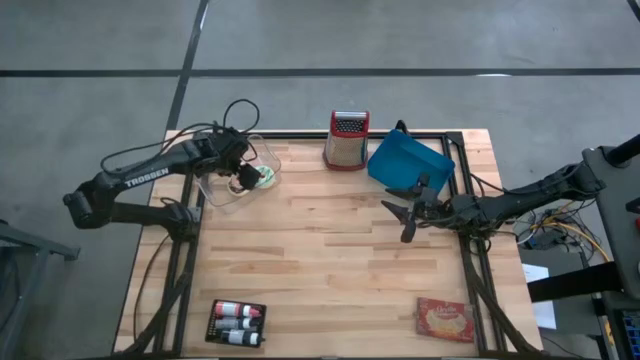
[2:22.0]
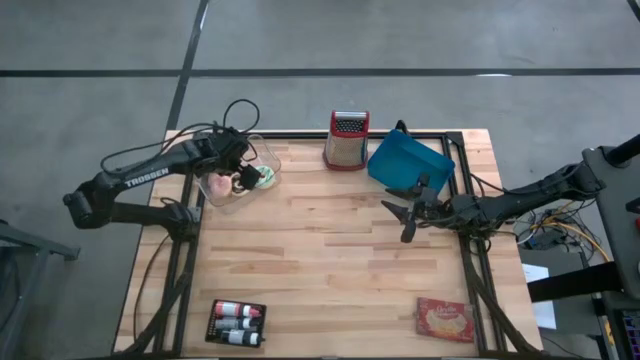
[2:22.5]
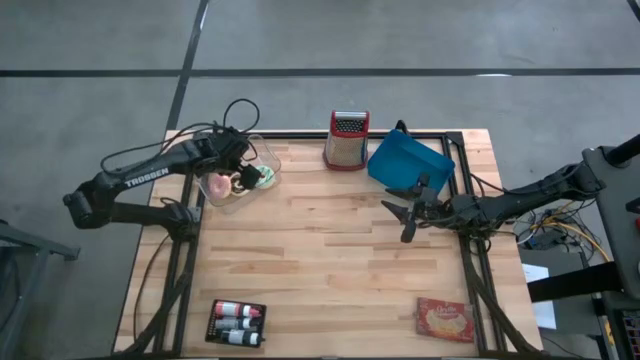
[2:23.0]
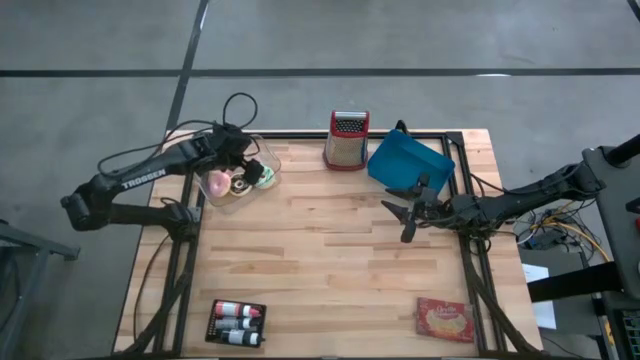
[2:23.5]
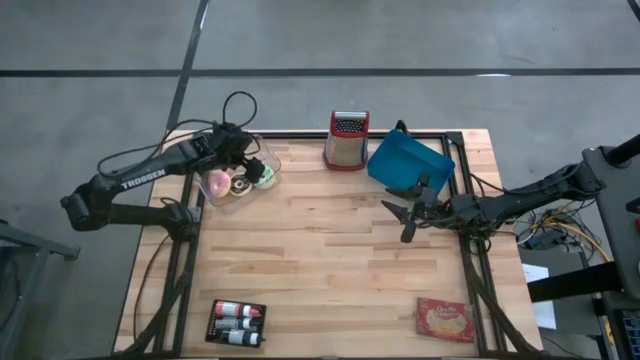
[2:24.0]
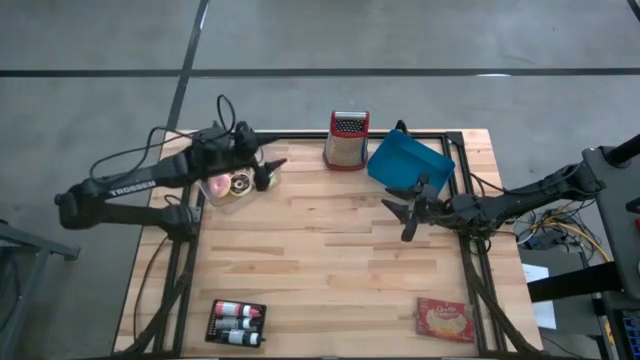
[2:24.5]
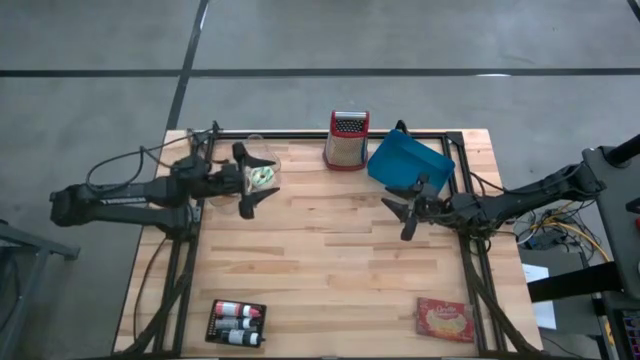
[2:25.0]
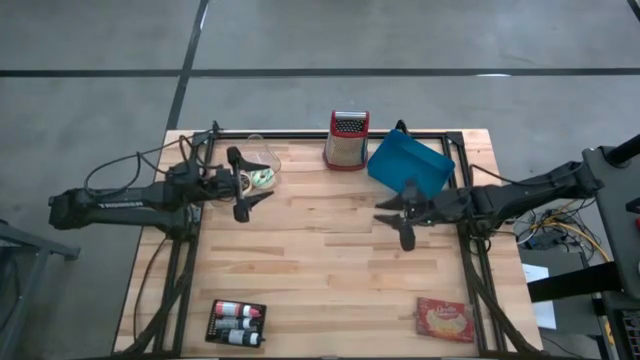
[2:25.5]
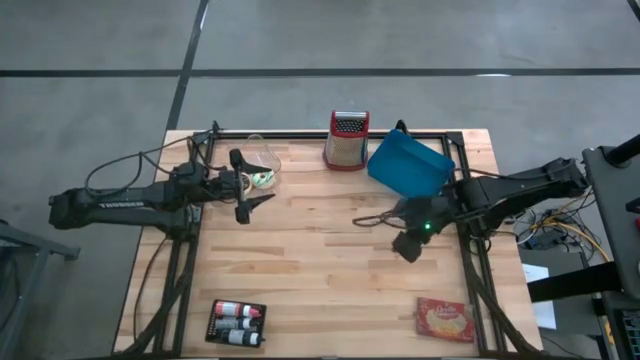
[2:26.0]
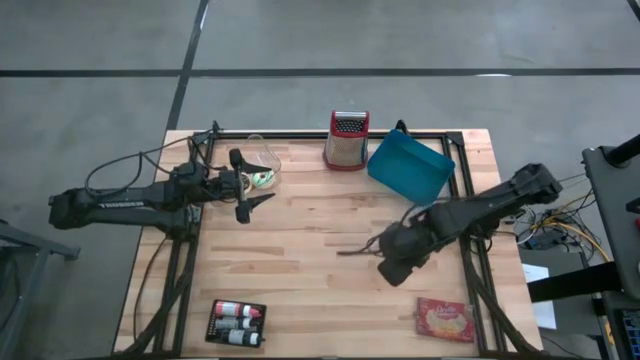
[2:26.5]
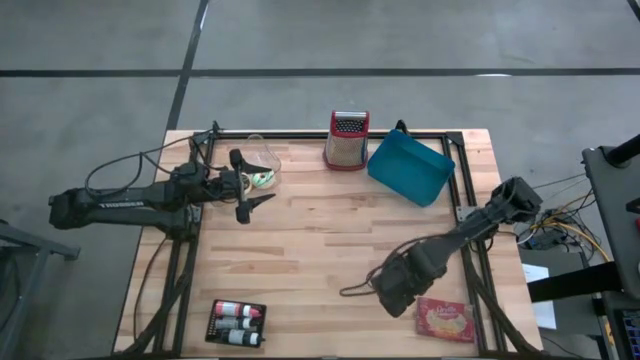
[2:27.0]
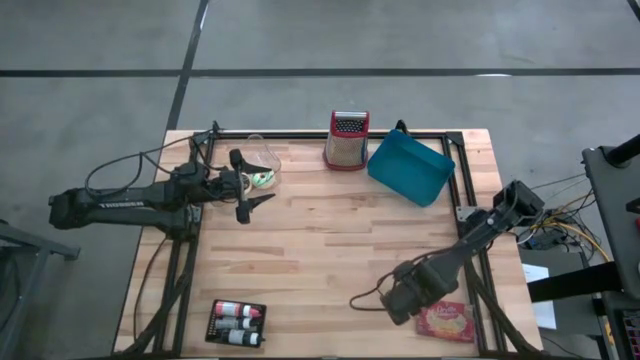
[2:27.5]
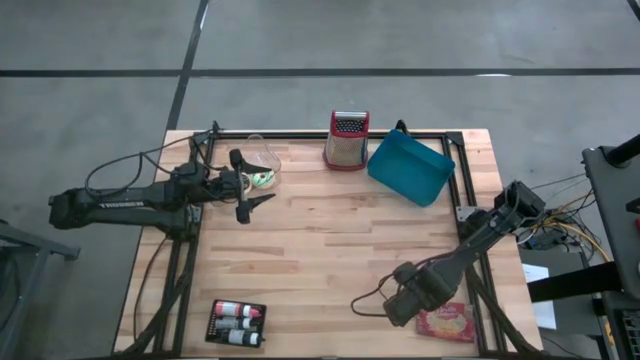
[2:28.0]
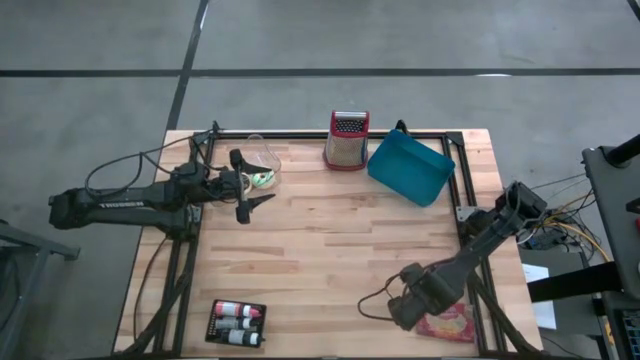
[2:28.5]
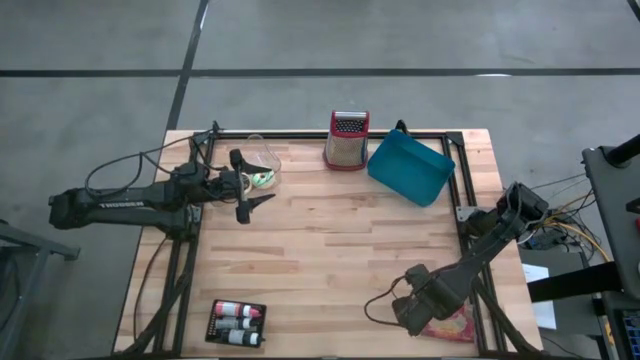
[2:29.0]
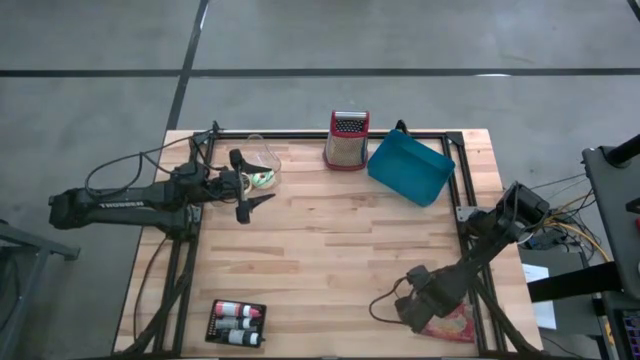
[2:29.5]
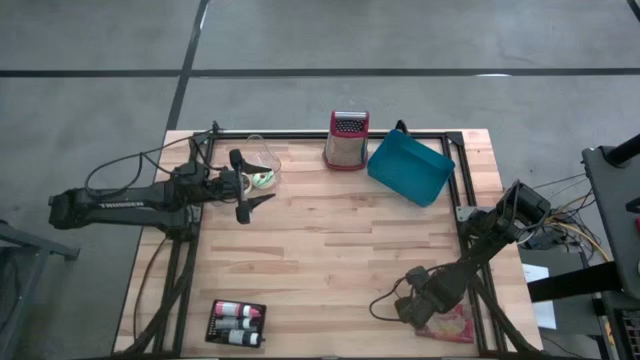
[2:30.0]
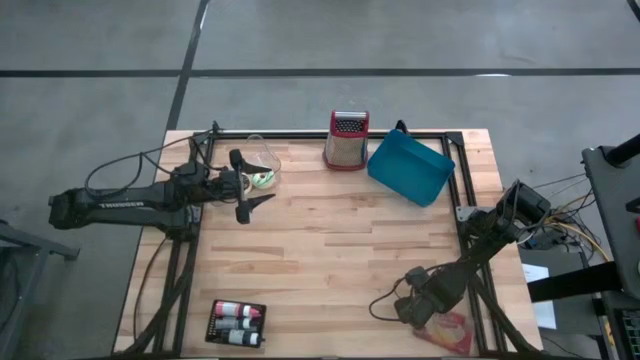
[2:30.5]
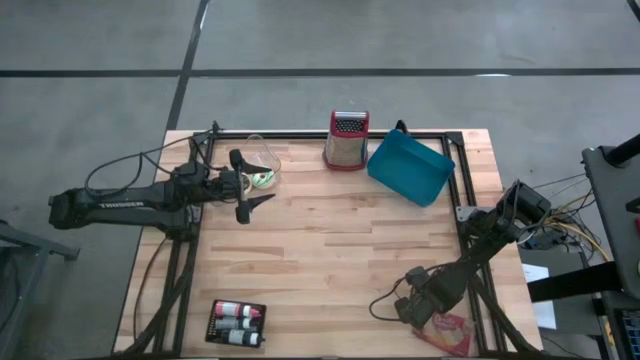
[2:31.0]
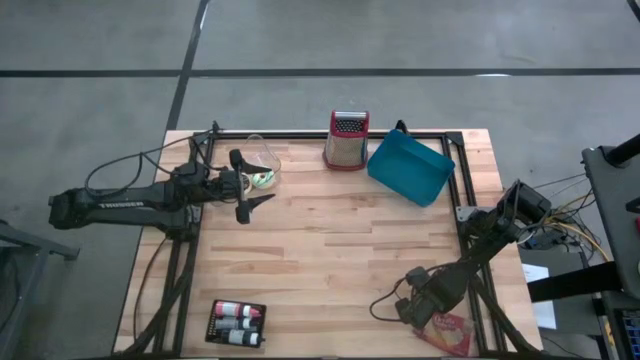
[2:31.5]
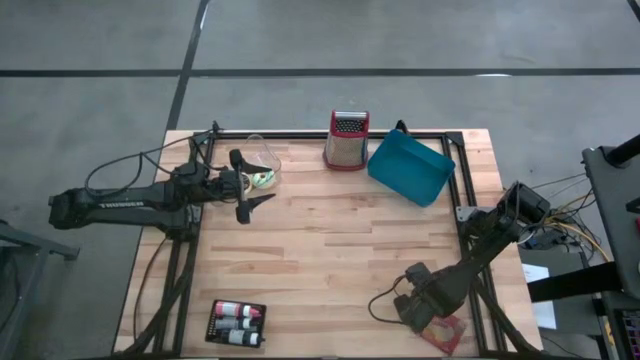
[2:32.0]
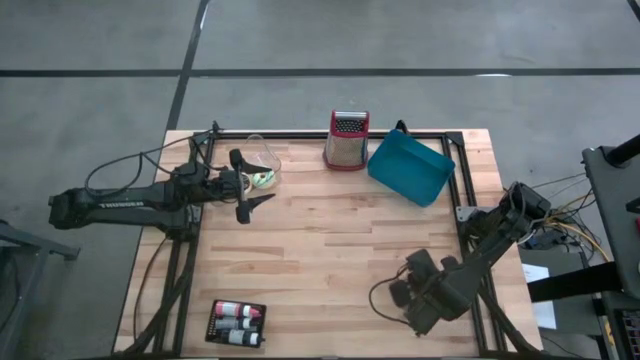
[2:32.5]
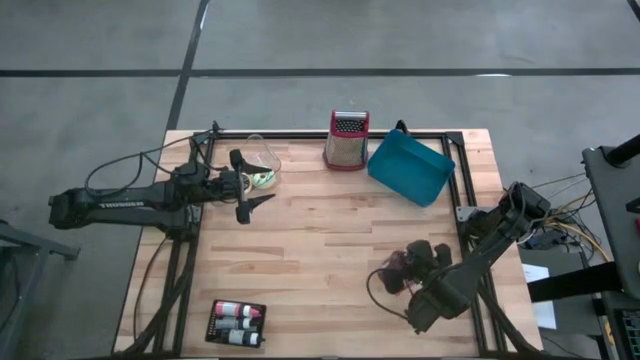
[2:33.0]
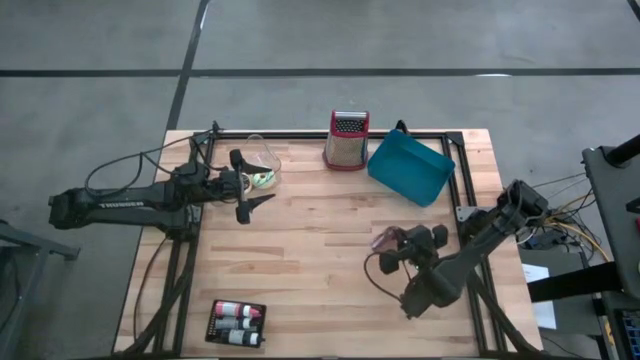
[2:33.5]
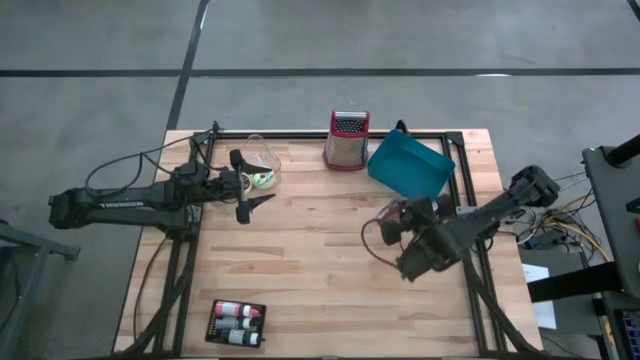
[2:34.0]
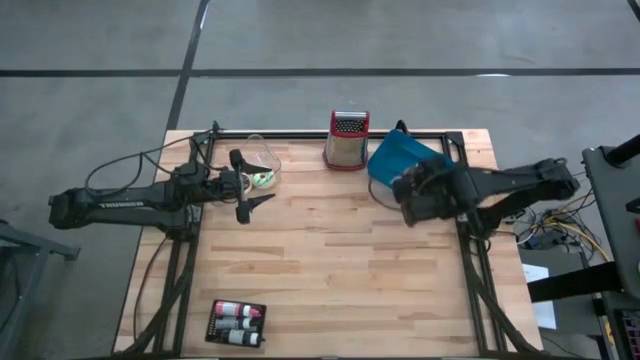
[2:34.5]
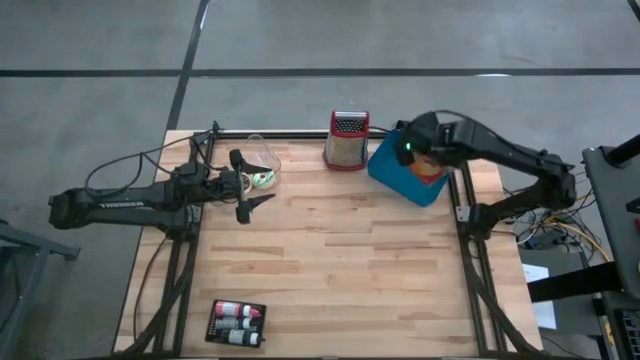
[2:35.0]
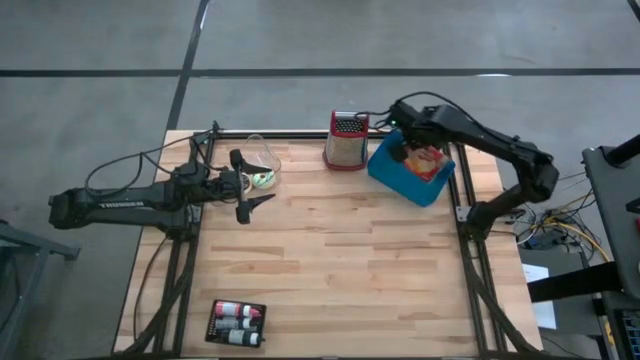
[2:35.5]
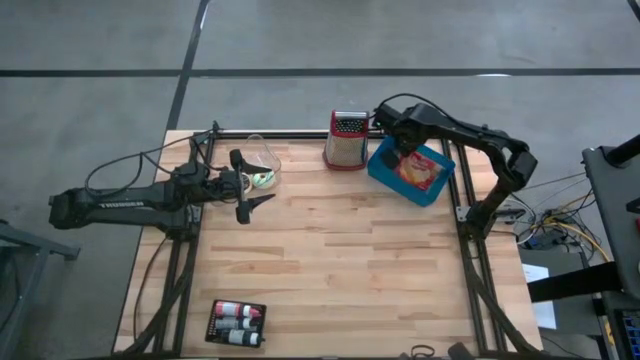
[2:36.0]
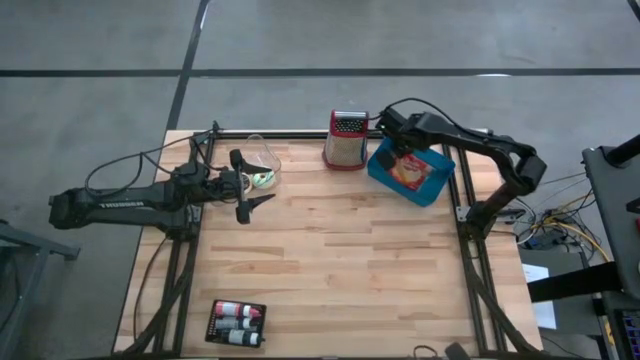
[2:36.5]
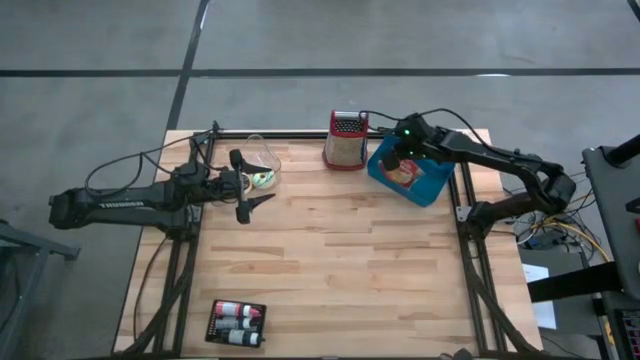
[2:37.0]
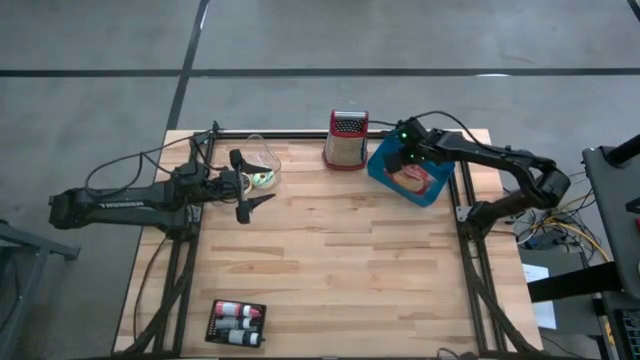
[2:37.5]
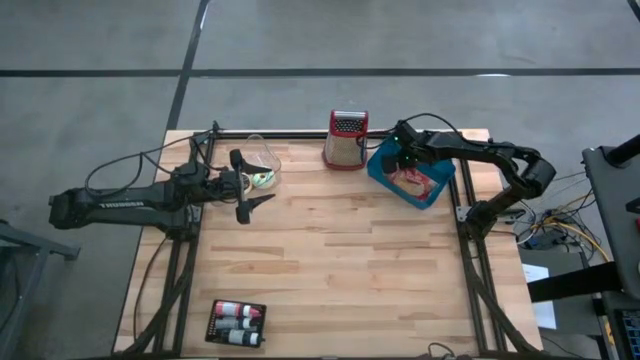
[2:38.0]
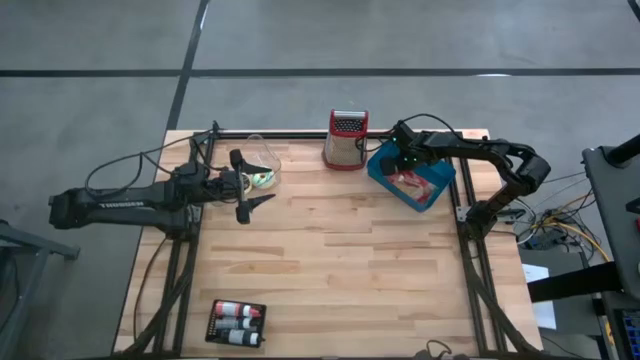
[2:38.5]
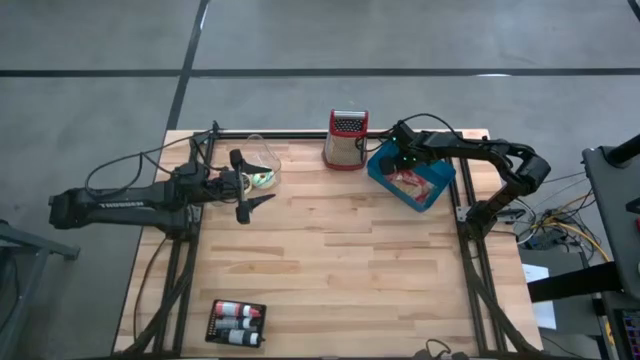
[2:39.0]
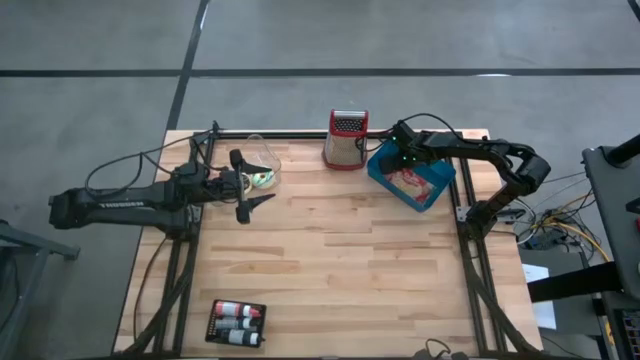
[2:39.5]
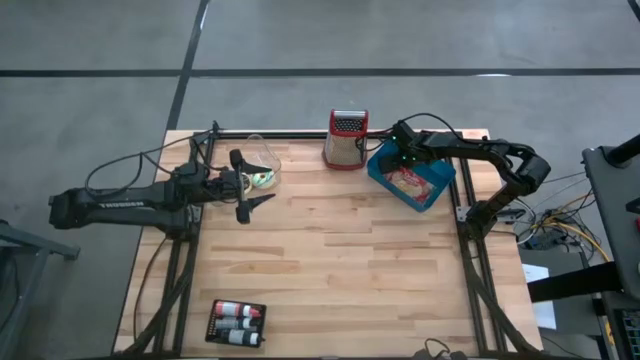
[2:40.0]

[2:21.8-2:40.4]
Task: Pick & Place Food Item
Put the red popcorn bag into the blue bin

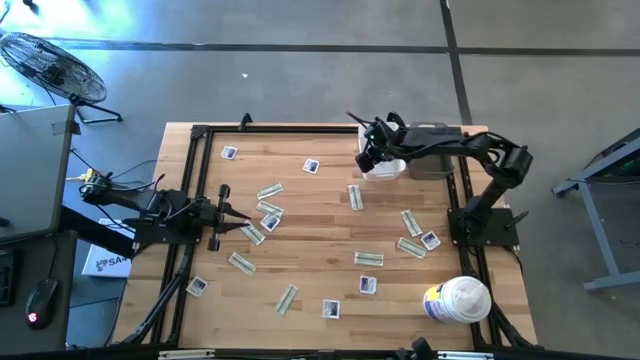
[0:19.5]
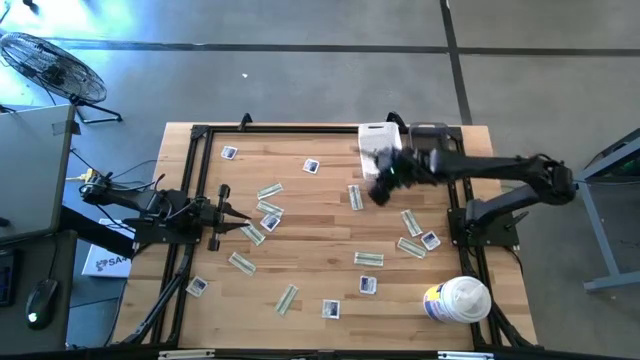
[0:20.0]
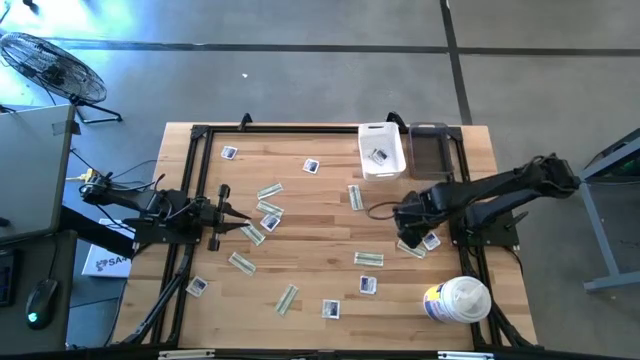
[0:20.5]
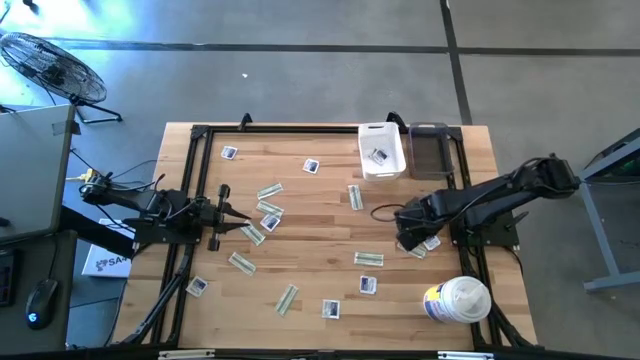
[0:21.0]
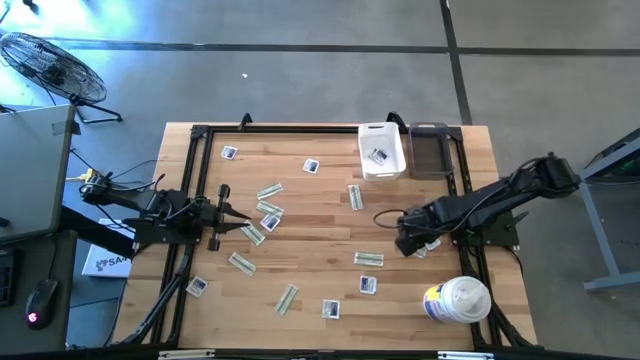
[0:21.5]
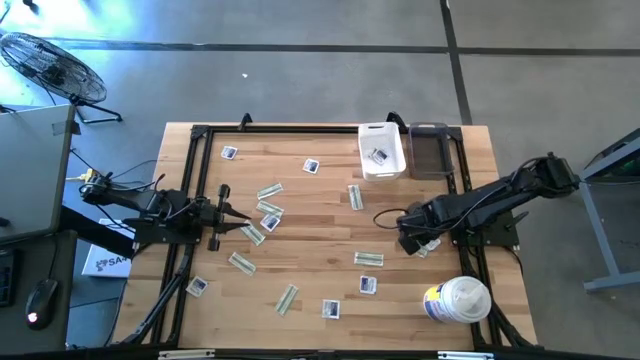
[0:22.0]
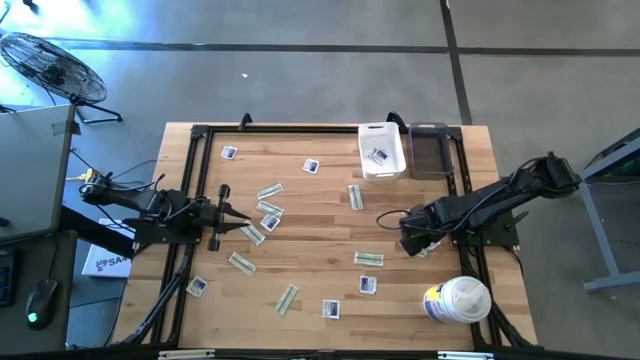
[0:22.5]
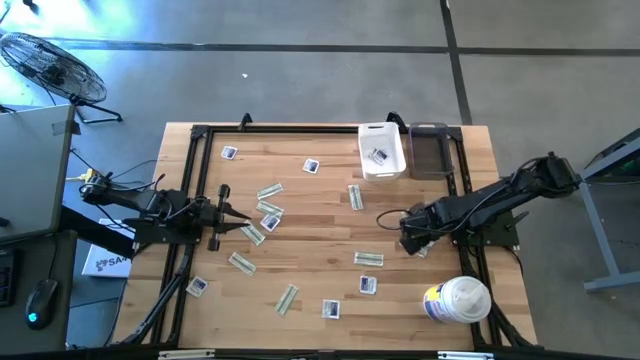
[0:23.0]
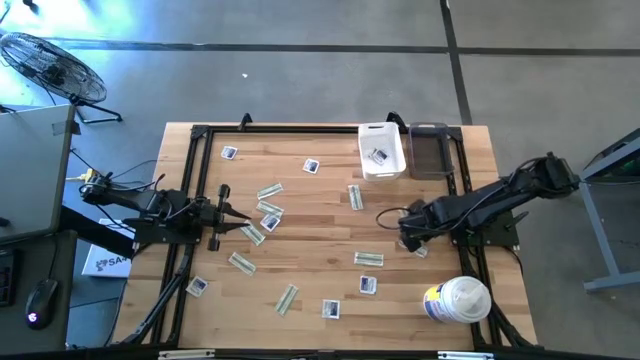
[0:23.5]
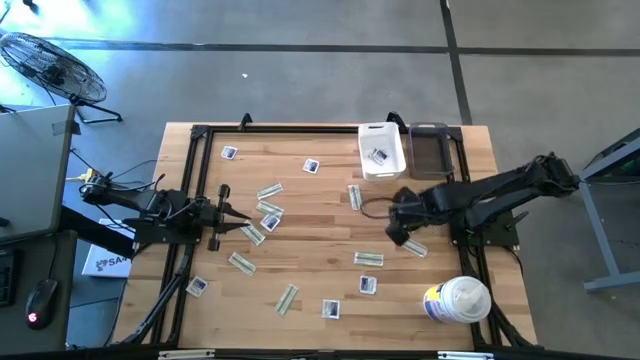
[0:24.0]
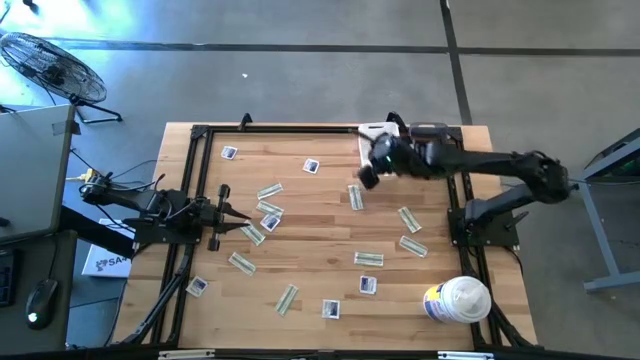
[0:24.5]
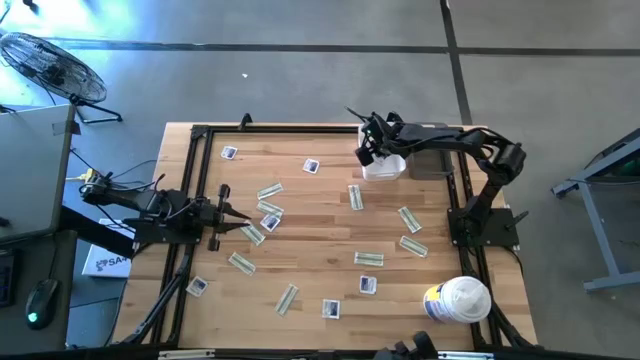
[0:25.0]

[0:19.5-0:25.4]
Task: Pick & Place First Aid Supplies
Put the alcohol pad into the white bin
